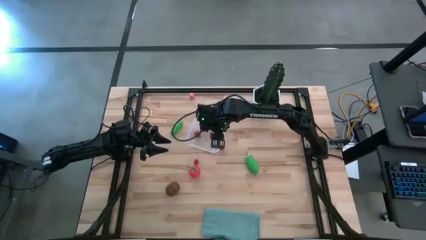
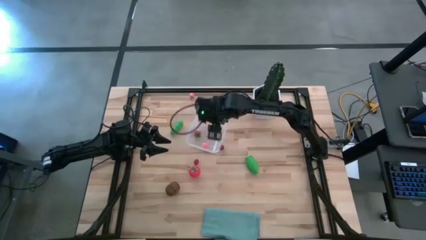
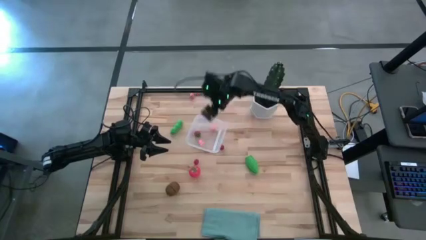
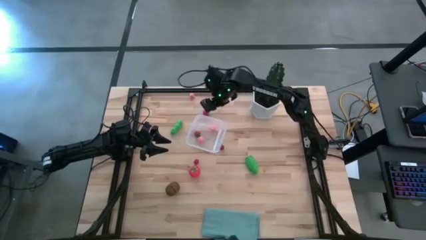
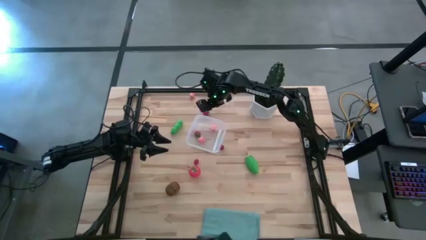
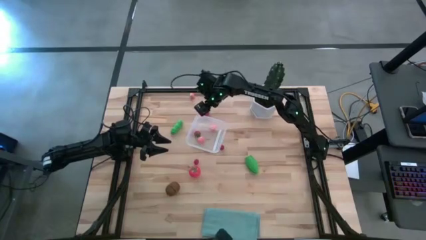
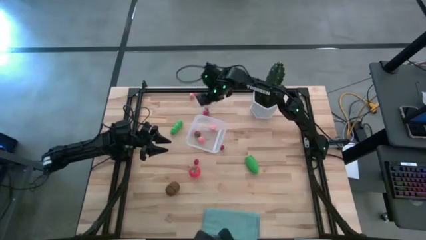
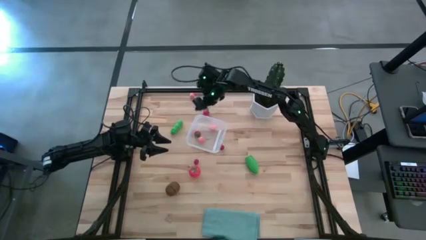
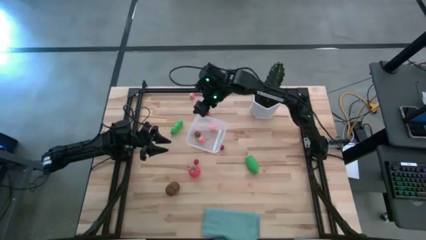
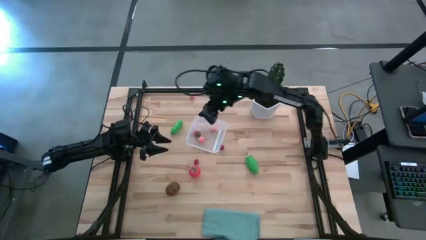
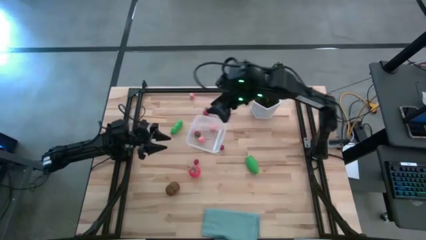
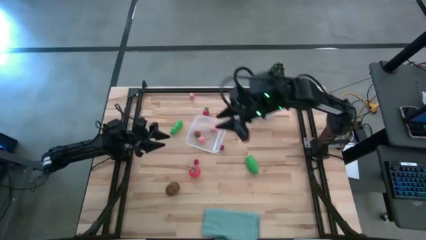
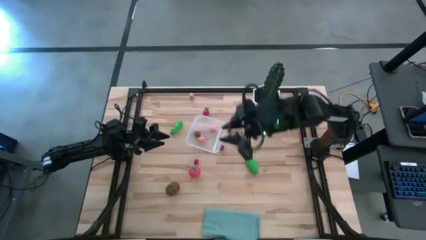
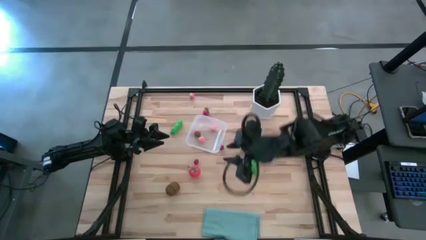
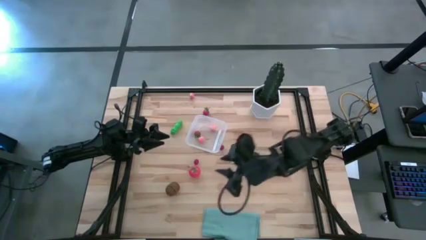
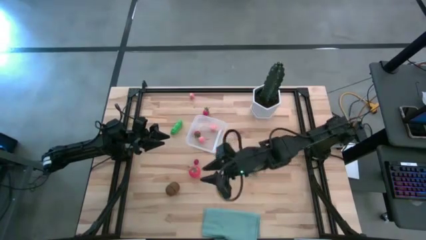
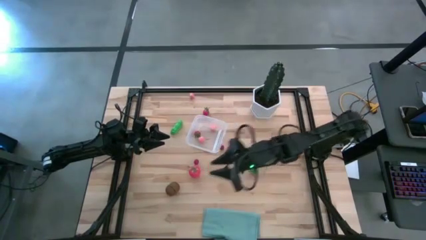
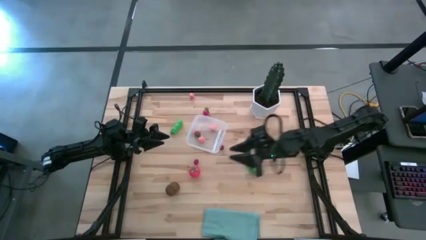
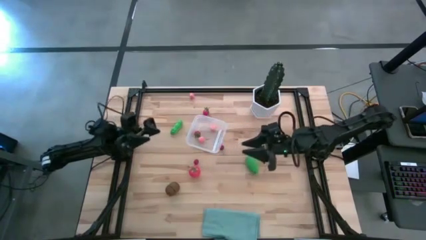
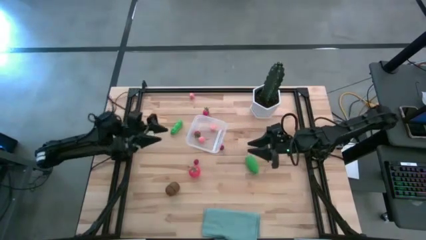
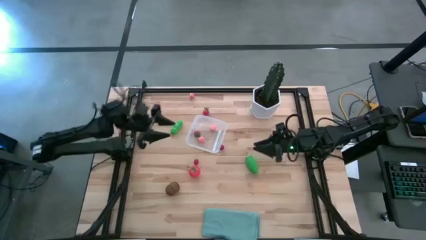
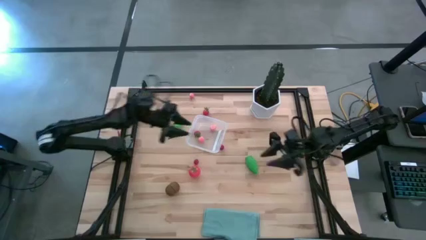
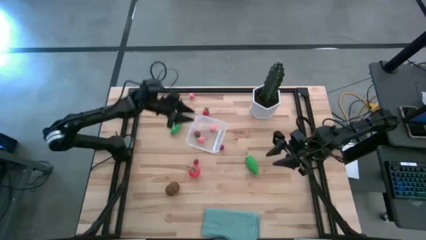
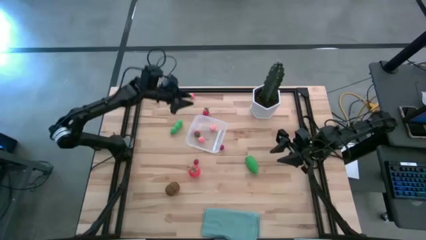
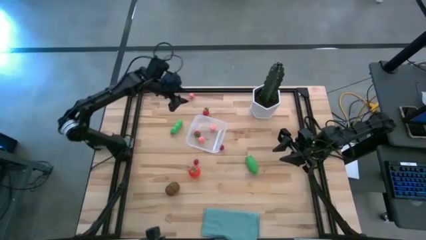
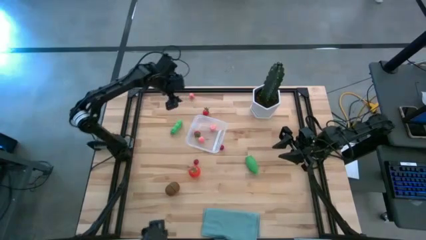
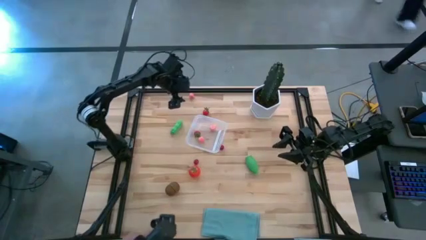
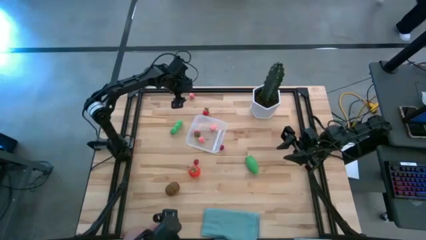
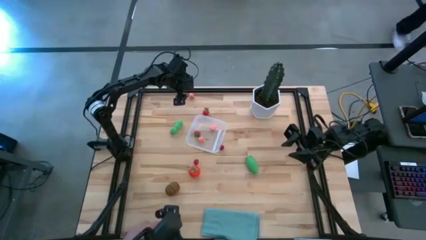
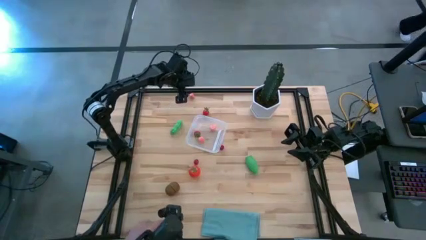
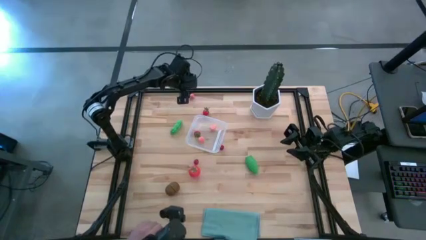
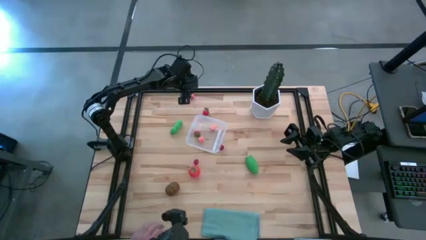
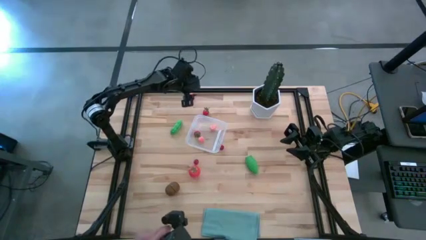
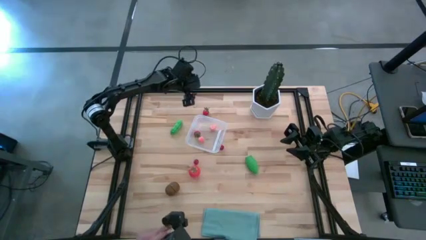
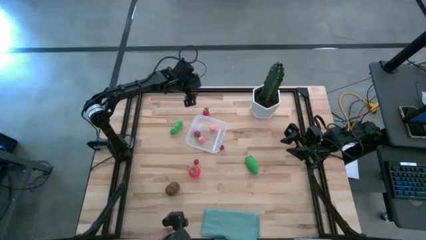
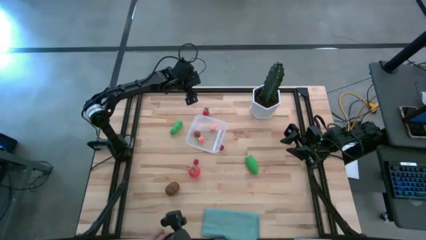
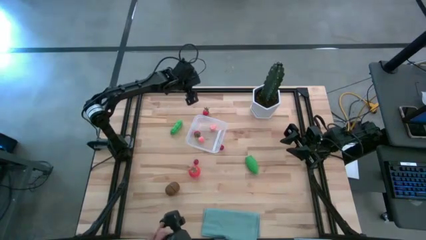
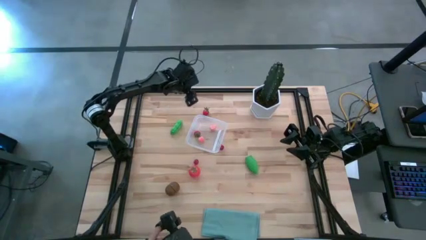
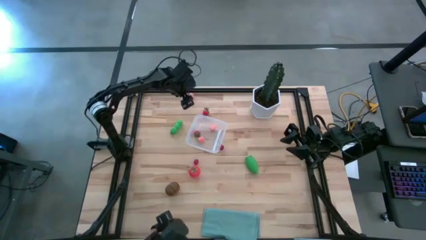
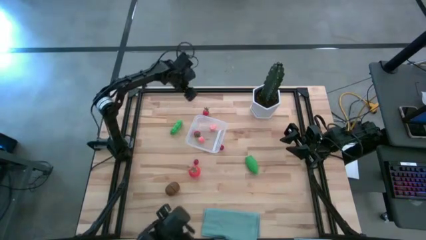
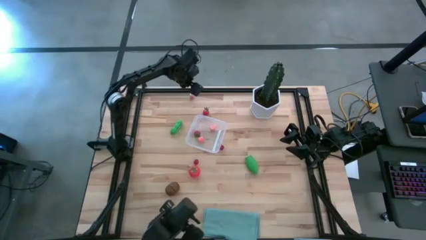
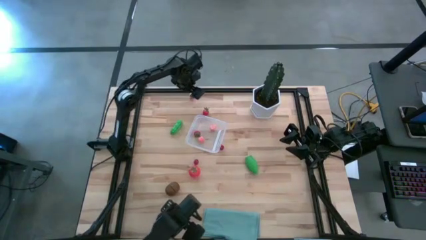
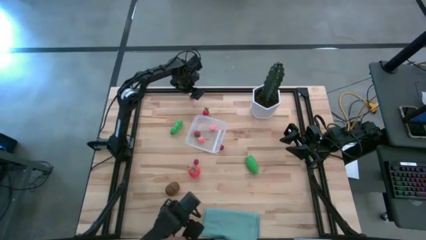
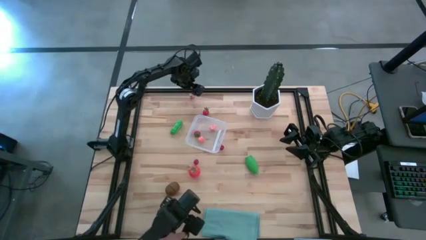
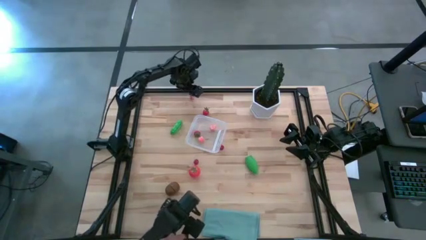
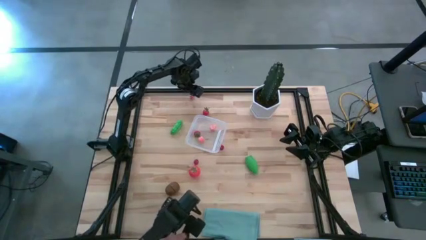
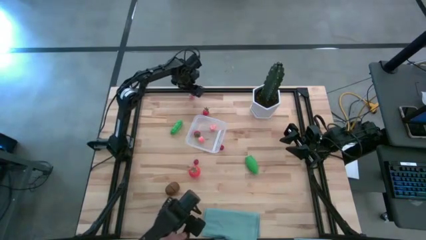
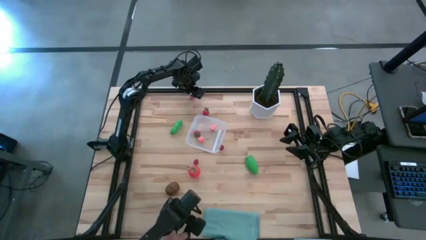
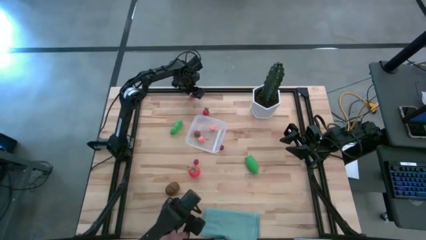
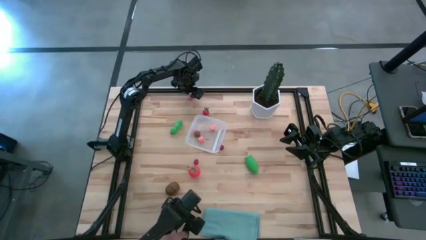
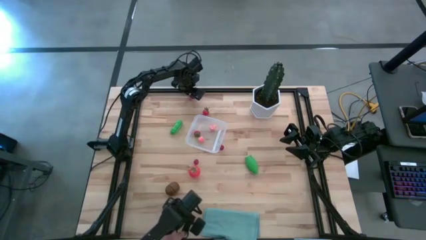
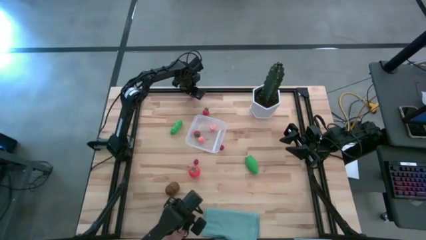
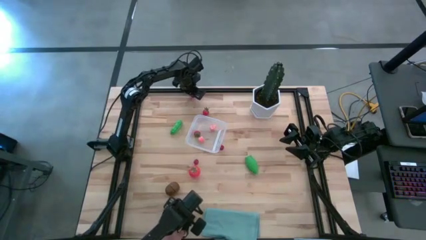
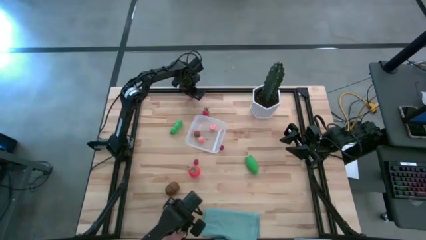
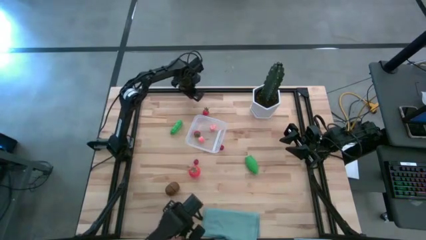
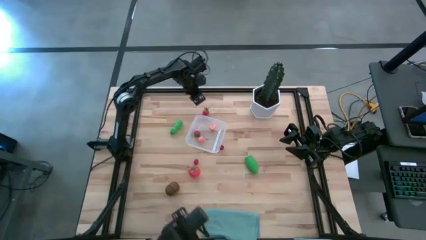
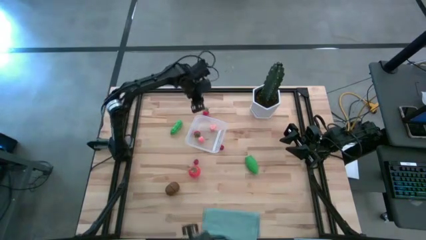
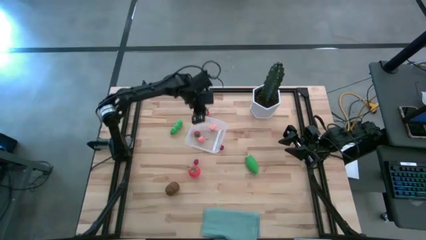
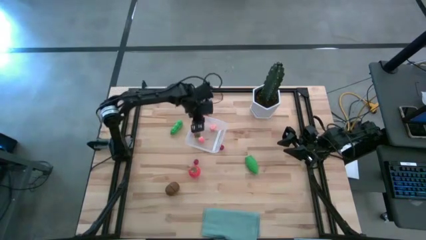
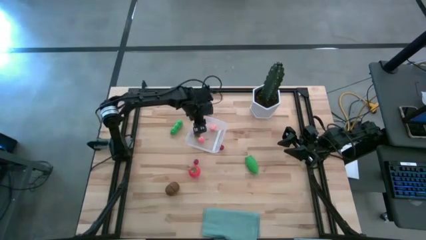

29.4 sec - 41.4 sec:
Task: Pick and placing Produce into tupperware
Put the pink peach into the transparent bin

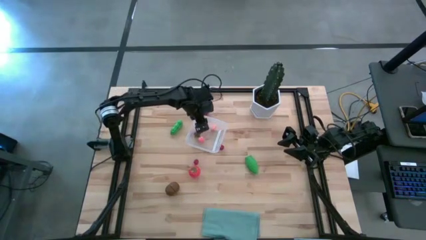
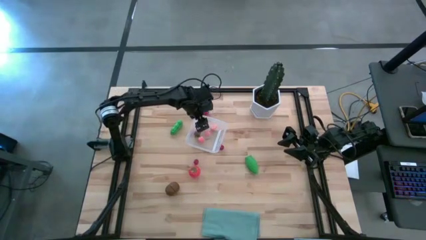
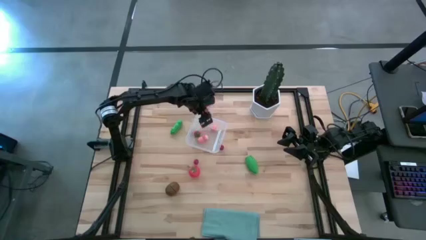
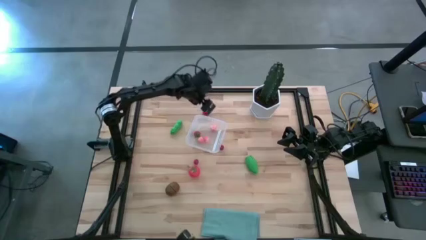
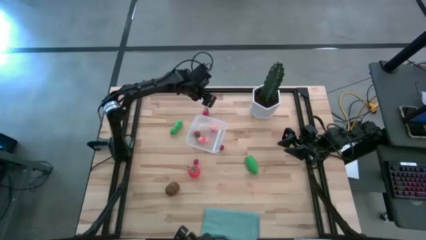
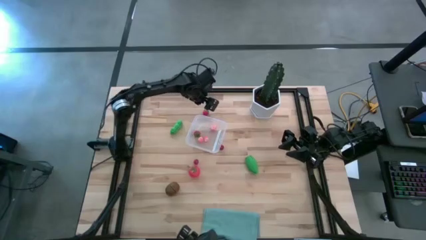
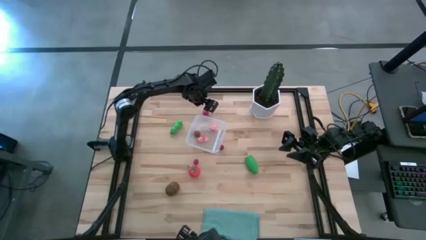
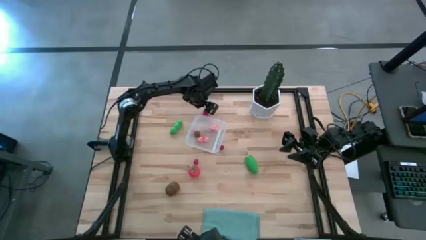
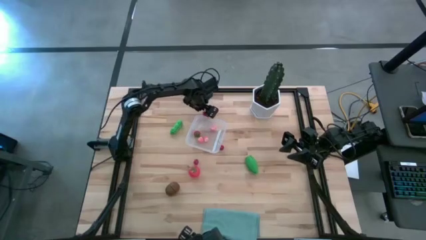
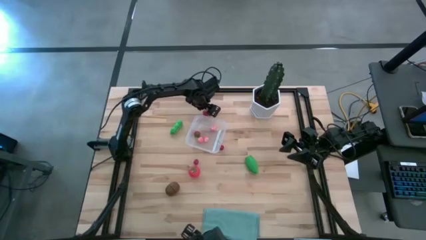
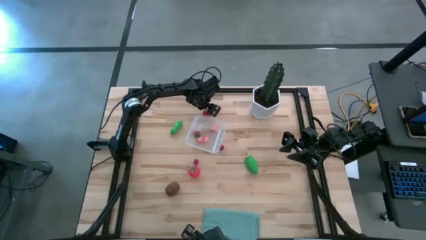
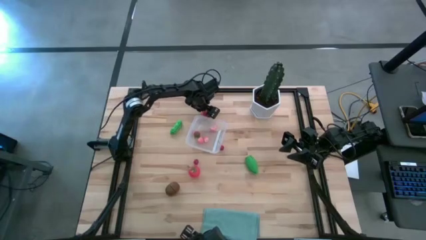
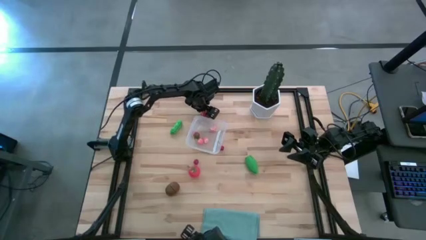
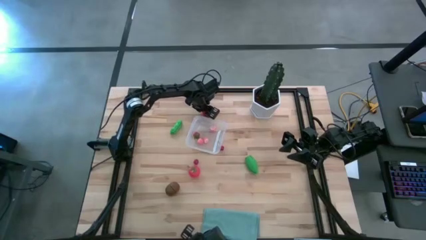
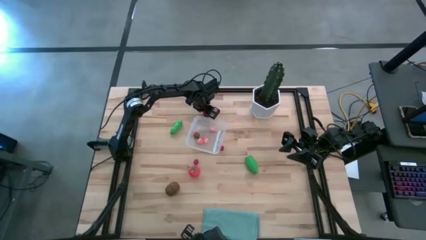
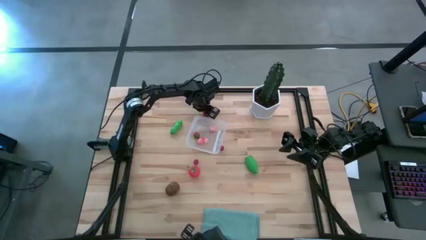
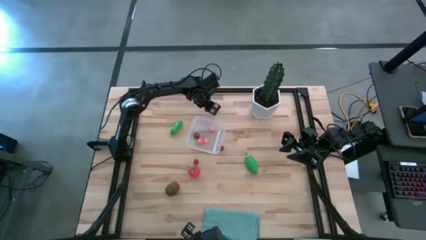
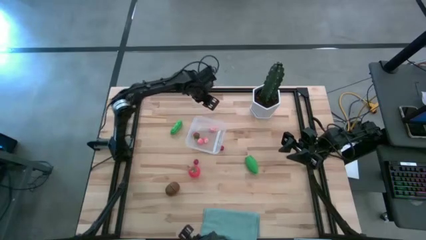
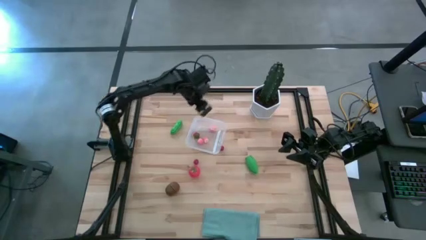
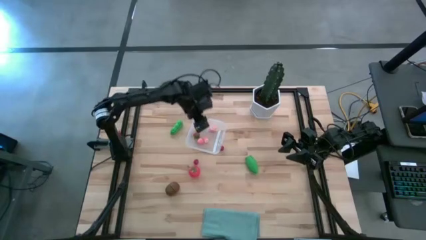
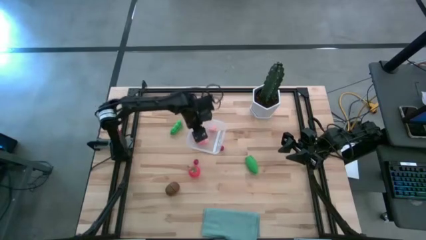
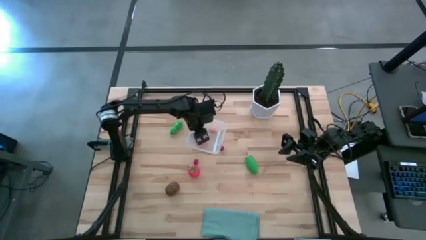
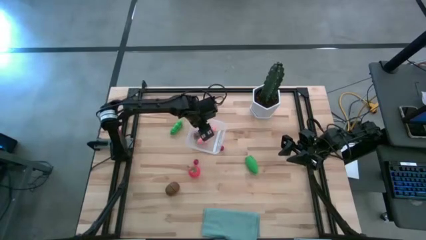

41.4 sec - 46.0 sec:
Put the red strawberry into the transparent bin
